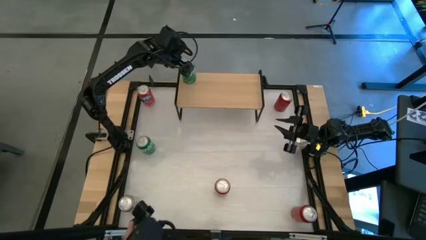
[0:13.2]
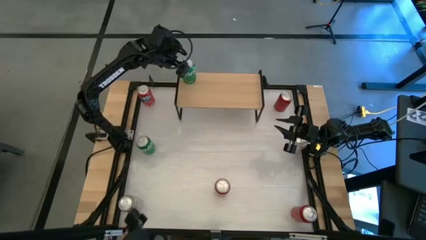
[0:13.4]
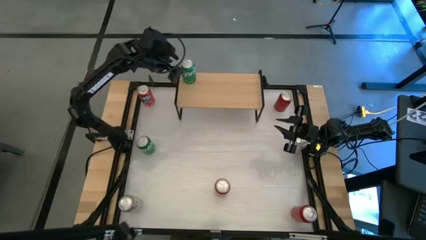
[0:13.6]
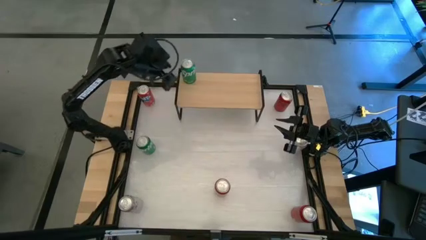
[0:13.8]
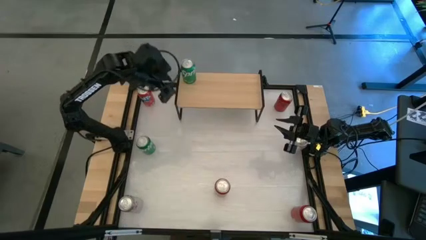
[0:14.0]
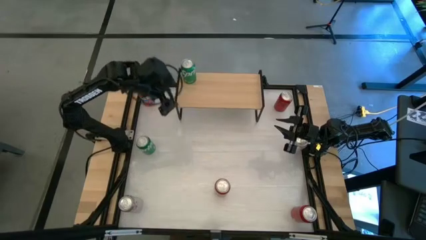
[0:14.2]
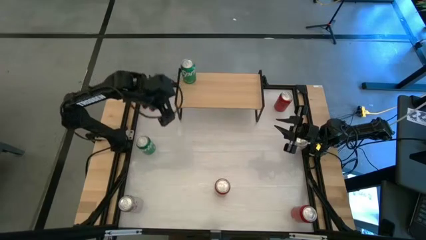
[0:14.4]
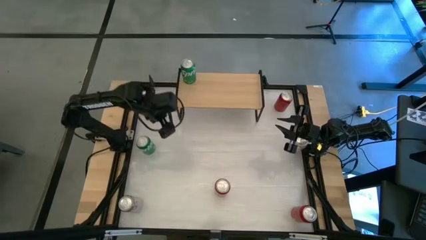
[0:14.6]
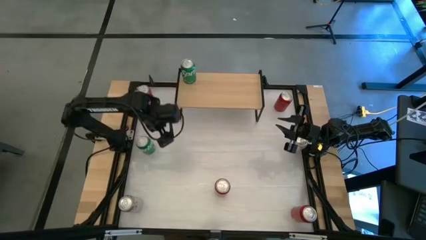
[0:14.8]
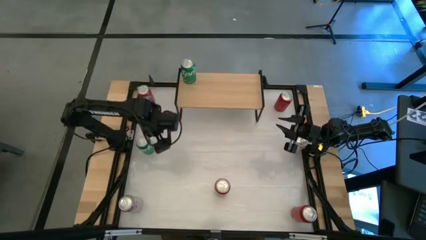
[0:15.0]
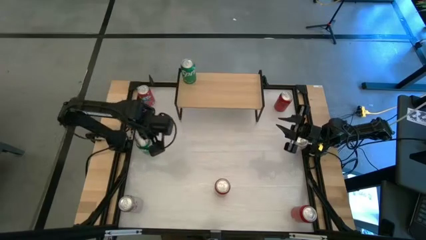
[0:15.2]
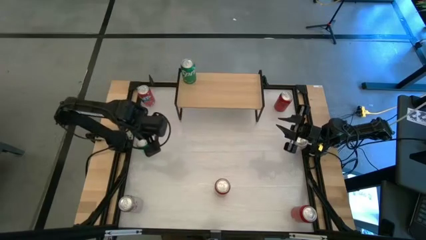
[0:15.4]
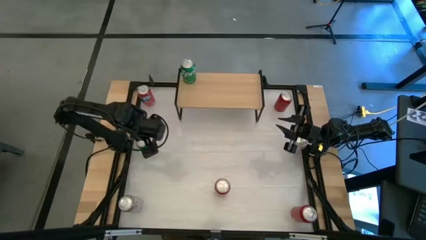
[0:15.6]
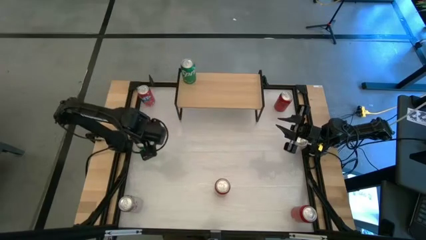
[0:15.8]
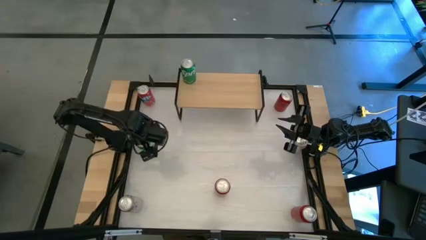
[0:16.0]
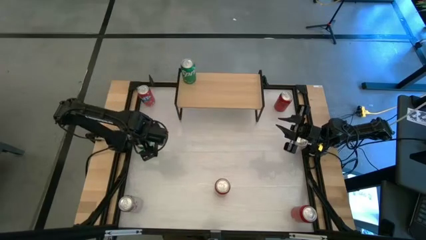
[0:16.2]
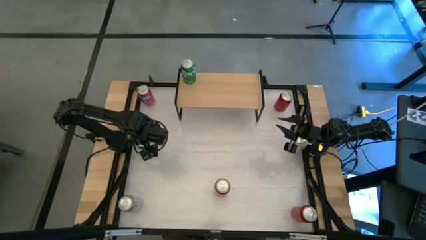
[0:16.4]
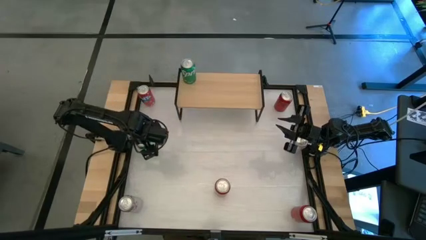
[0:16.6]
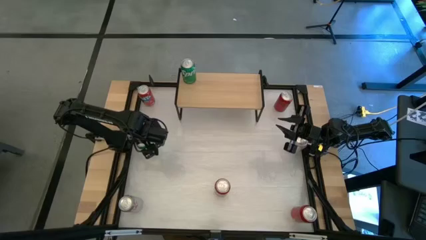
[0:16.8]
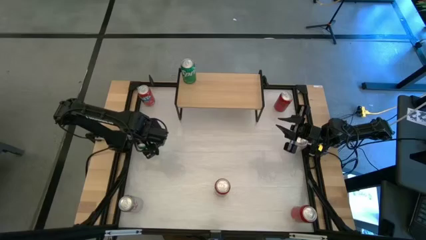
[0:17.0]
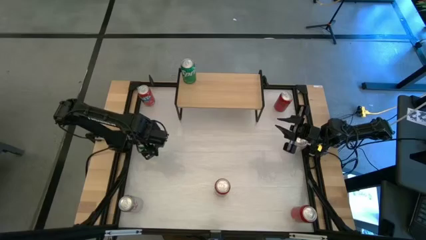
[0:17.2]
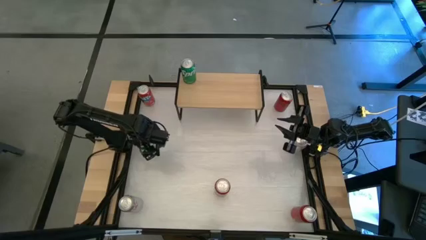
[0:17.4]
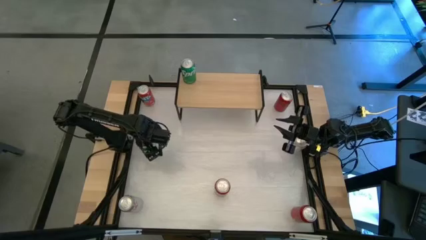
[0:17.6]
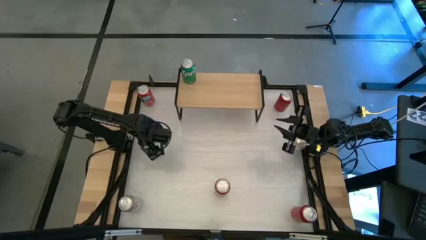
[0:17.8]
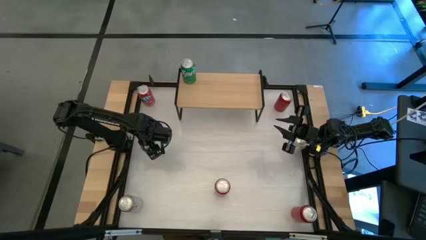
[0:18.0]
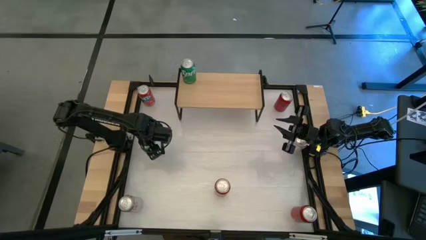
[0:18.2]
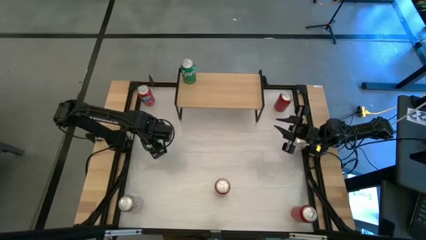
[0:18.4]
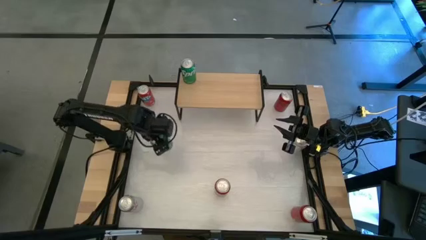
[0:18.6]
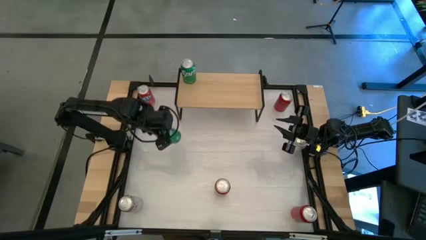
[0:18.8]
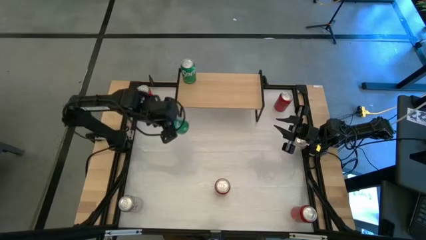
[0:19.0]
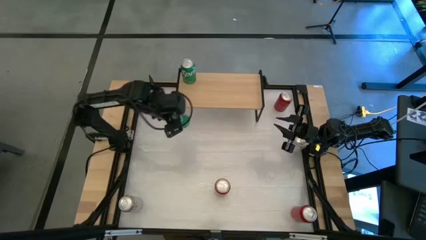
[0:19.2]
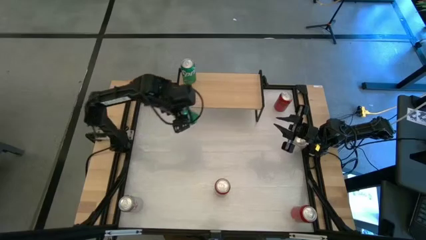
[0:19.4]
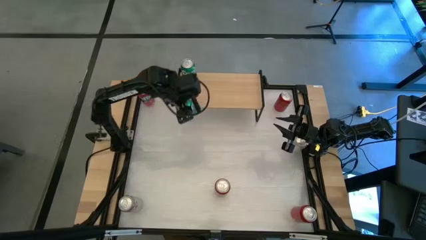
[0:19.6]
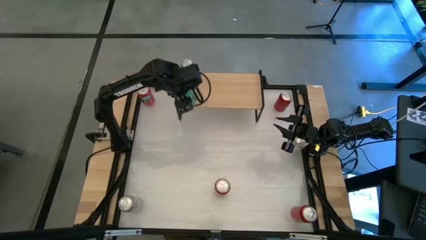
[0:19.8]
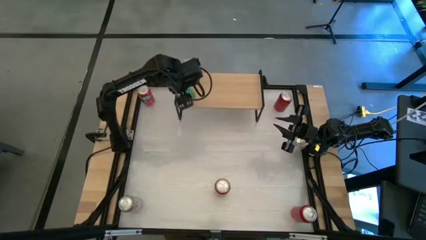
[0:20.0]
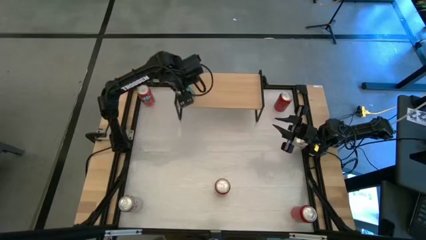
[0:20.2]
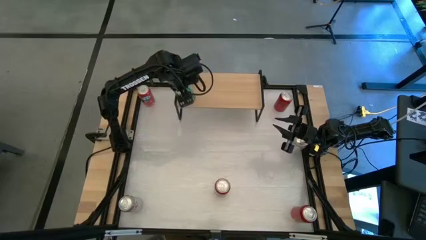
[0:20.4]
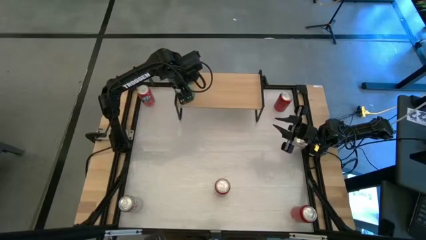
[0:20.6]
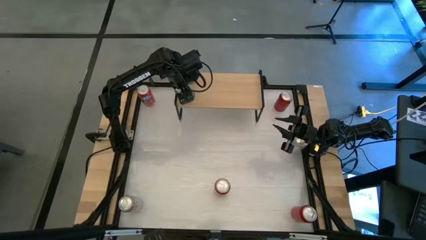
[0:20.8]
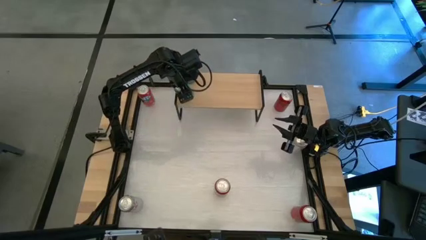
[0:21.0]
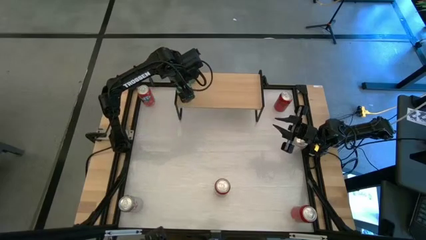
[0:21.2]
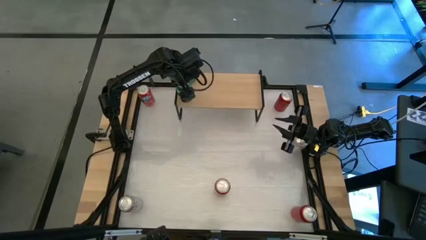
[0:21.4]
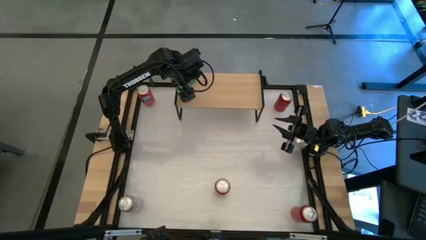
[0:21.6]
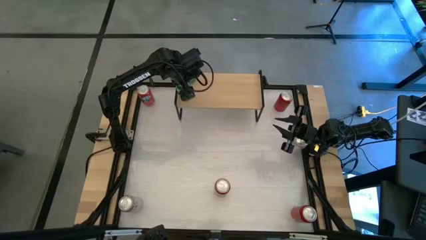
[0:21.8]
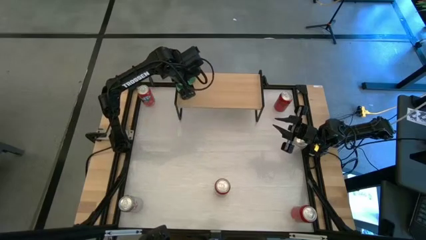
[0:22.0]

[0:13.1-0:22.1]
Task: Place canned beverage on shelf
Put the green soda can on the shelf aligned with the other green soda can

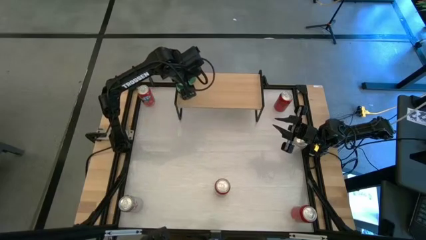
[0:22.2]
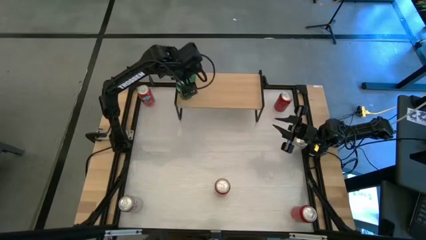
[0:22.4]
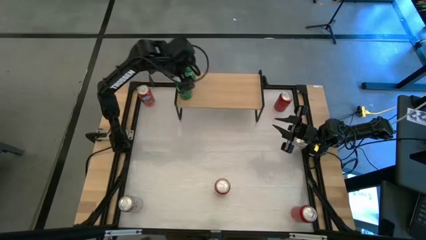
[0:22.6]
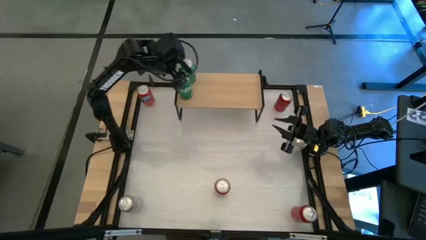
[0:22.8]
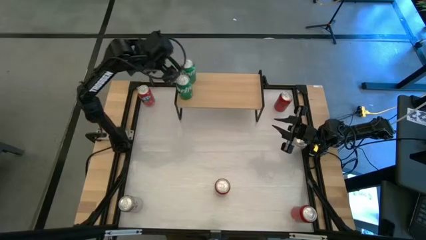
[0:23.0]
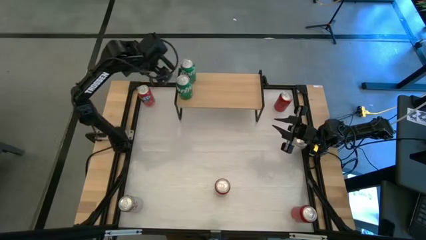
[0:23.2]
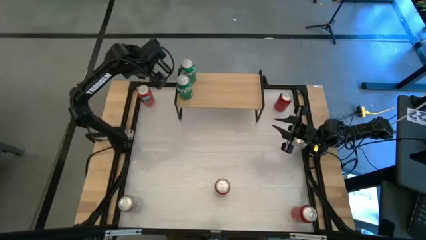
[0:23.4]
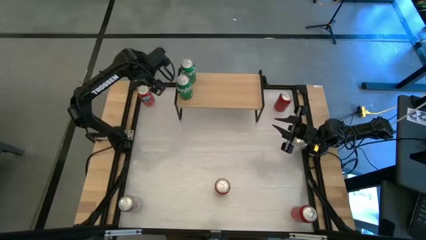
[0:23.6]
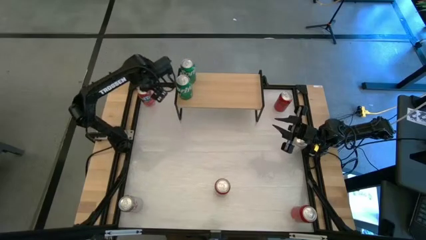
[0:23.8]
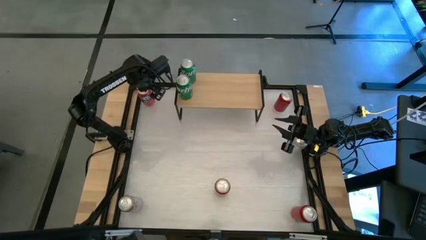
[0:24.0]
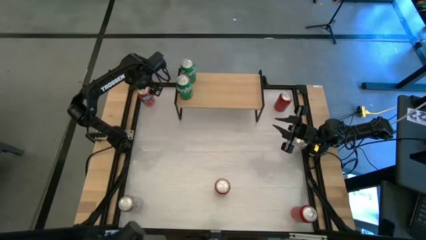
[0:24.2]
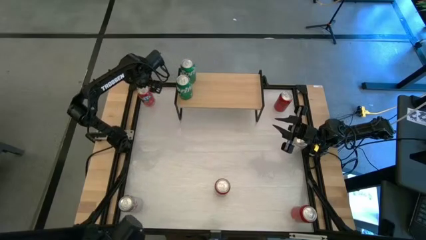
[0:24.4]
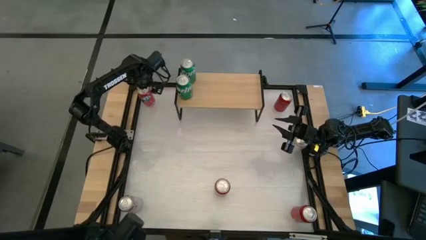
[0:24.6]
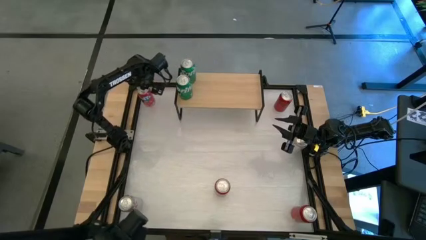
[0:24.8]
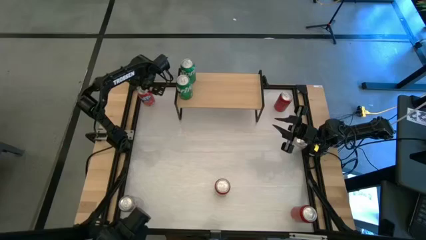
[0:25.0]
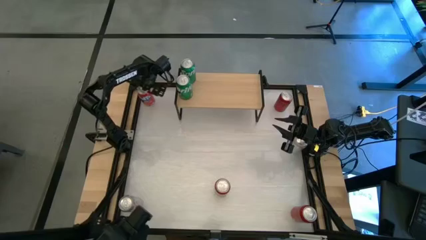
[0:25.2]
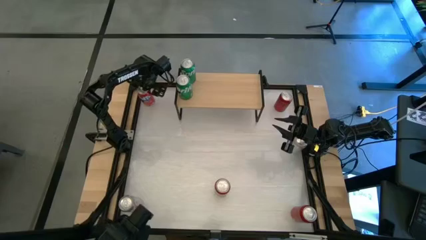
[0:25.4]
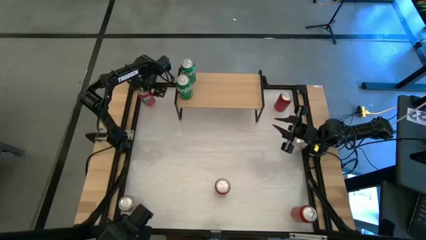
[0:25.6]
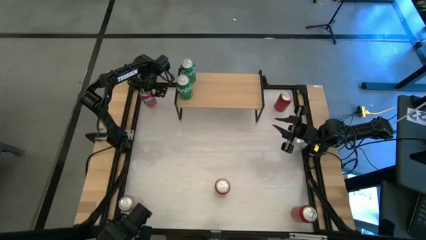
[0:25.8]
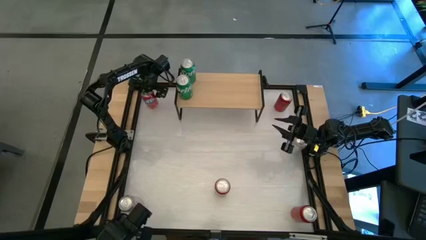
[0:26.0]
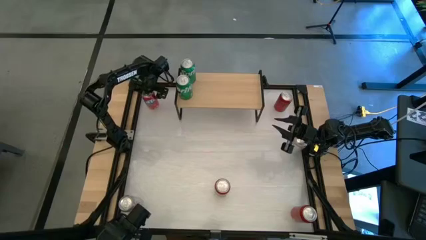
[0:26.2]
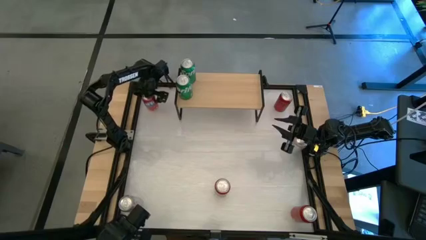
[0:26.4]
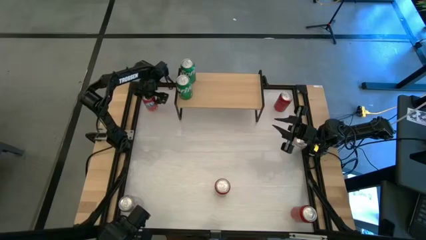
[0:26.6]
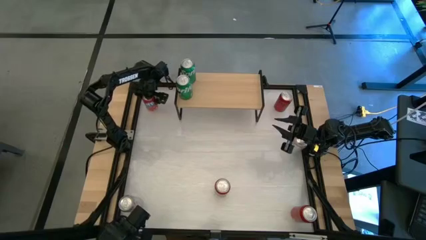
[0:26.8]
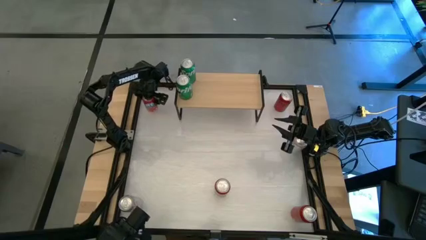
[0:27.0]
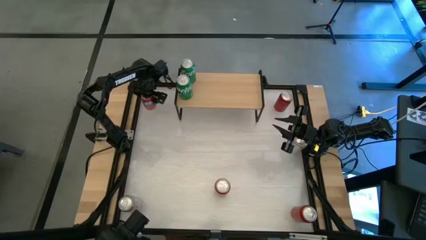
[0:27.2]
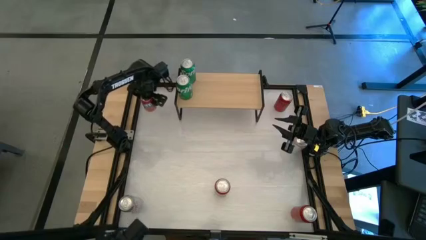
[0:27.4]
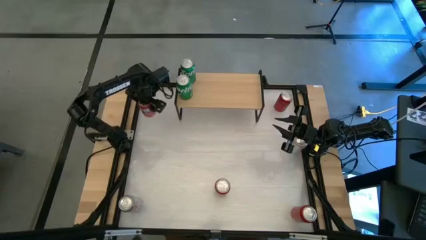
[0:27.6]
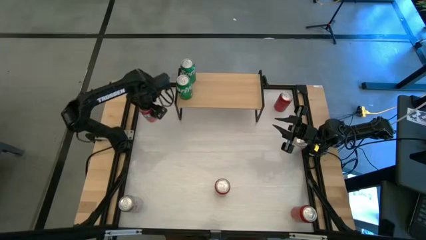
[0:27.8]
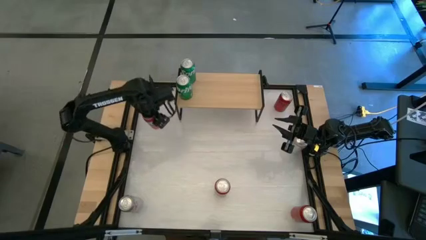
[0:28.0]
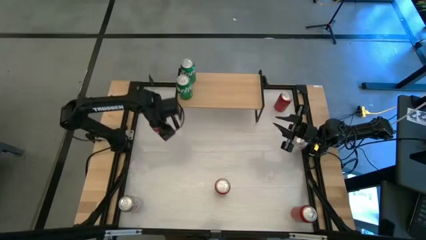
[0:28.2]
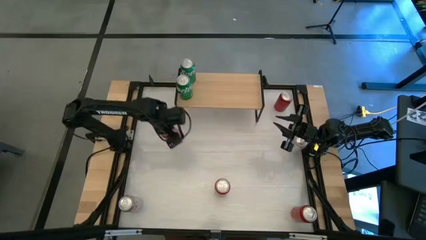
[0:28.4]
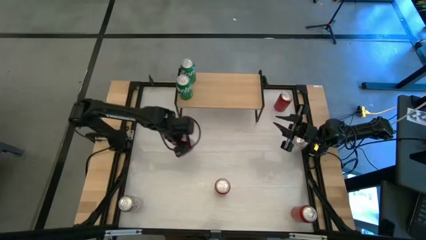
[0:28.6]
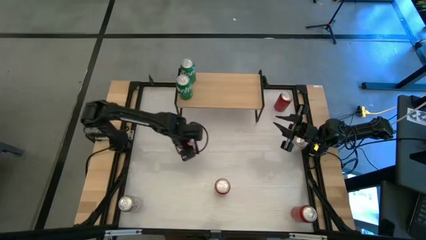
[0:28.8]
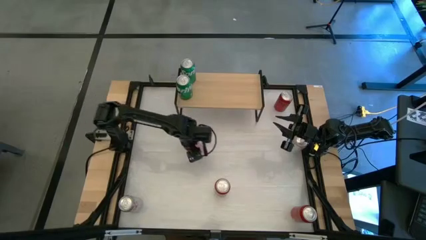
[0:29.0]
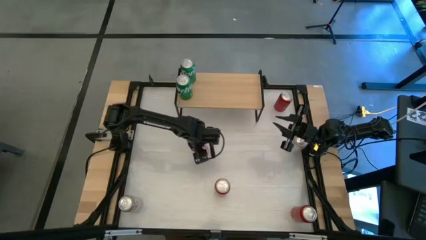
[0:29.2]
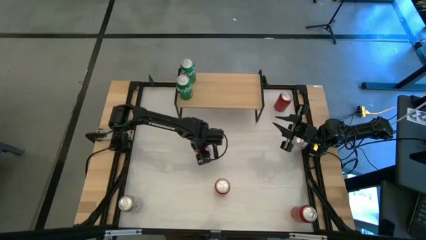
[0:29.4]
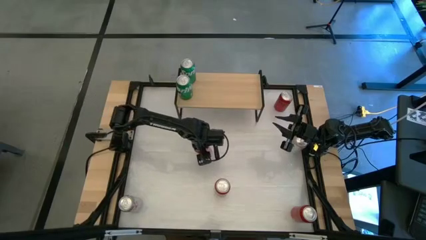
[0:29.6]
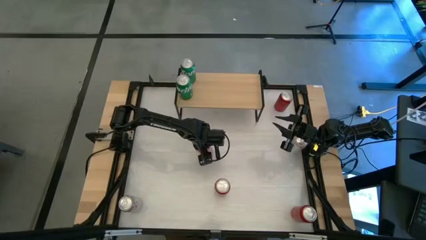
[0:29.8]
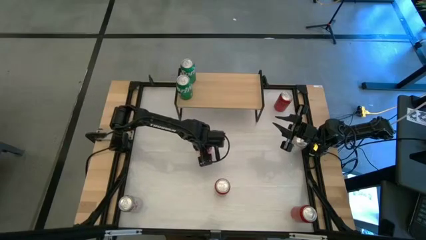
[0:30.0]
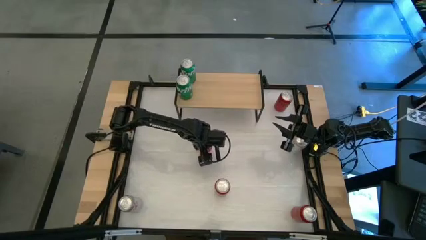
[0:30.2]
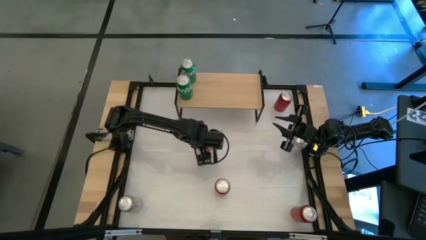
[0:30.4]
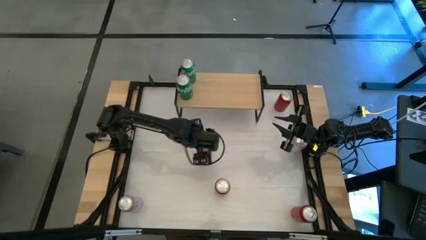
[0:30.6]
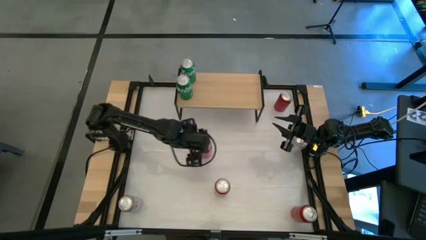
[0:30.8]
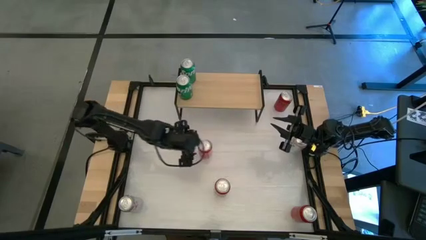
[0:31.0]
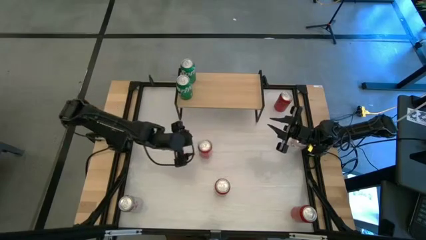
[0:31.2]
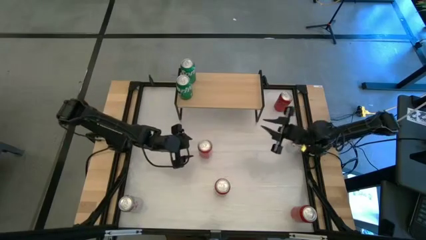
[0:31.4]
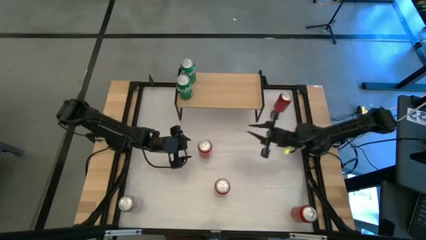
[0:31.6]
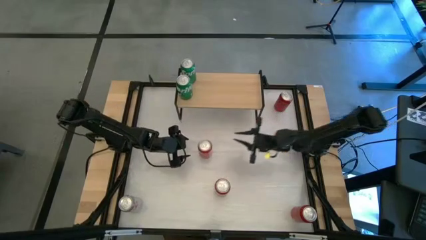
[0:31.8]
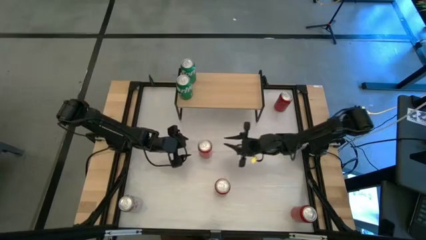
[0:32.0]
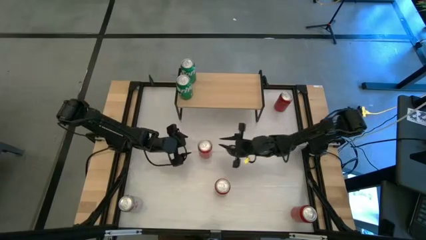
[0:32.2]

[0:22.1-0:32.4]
Put the top orange soda can on the shelf
